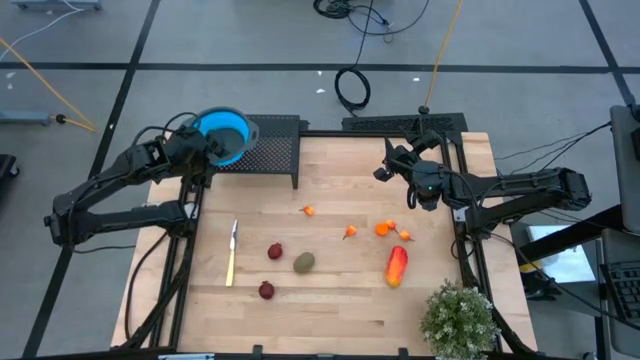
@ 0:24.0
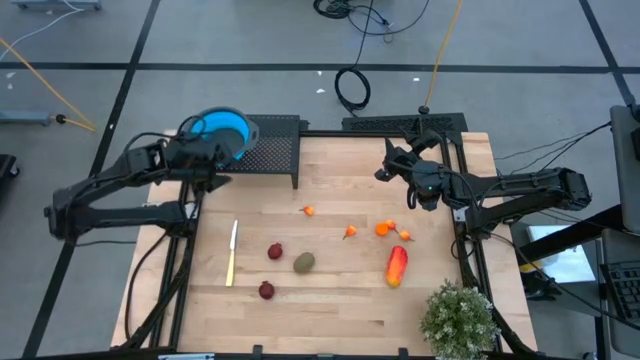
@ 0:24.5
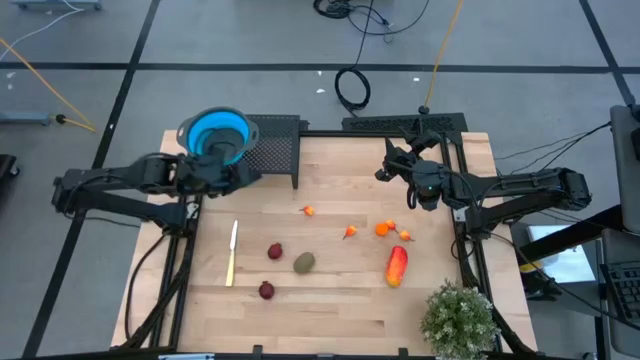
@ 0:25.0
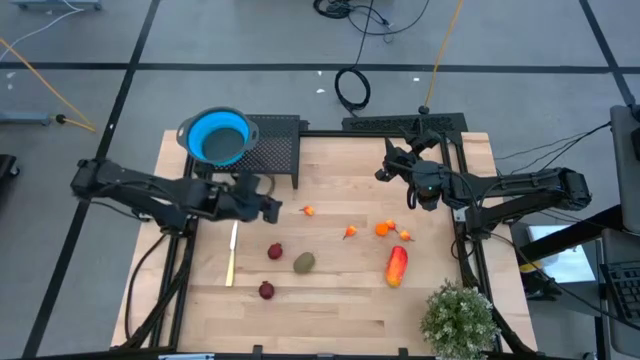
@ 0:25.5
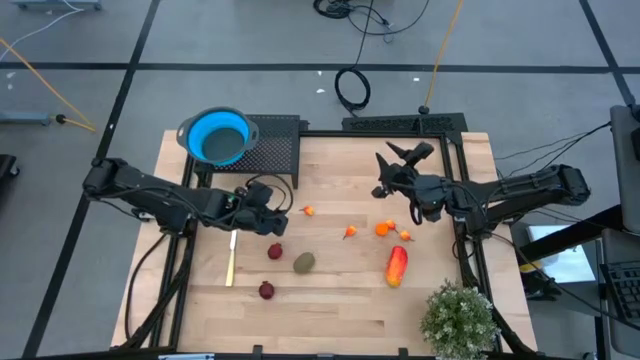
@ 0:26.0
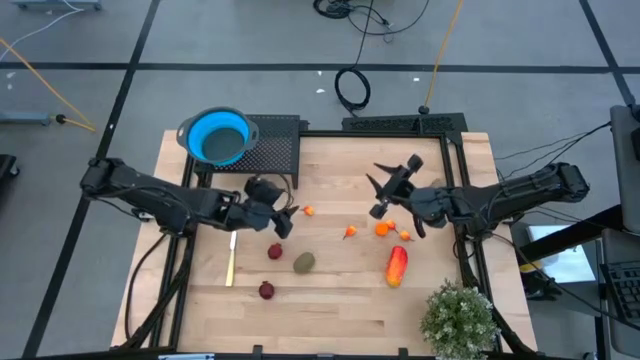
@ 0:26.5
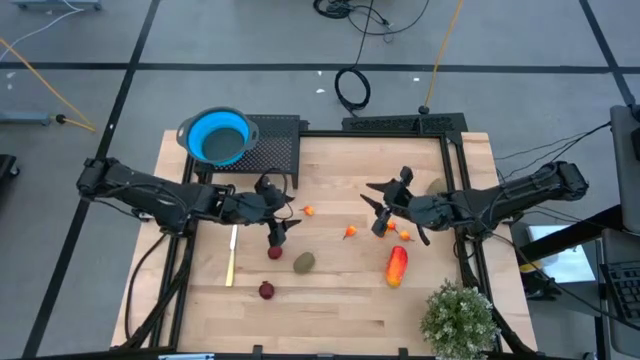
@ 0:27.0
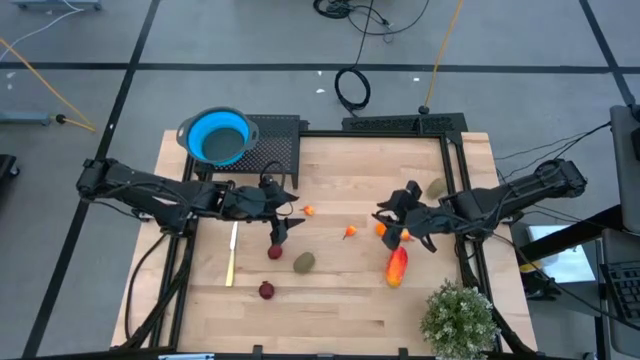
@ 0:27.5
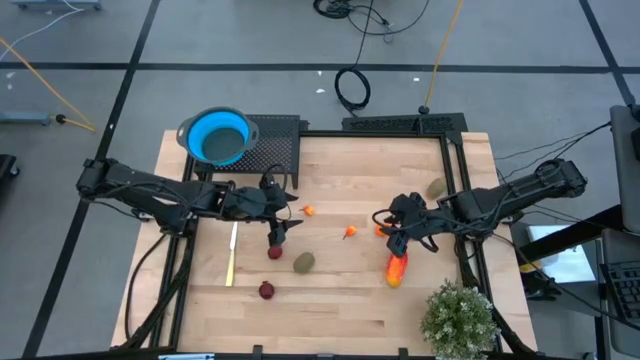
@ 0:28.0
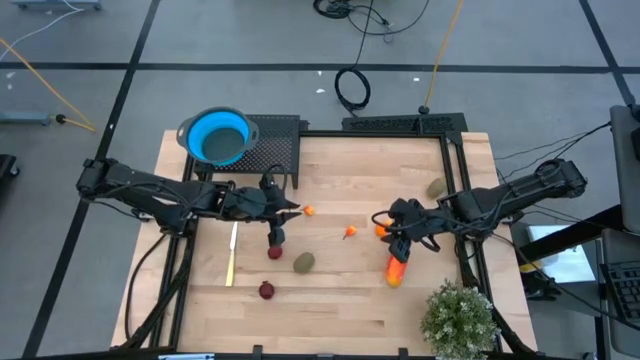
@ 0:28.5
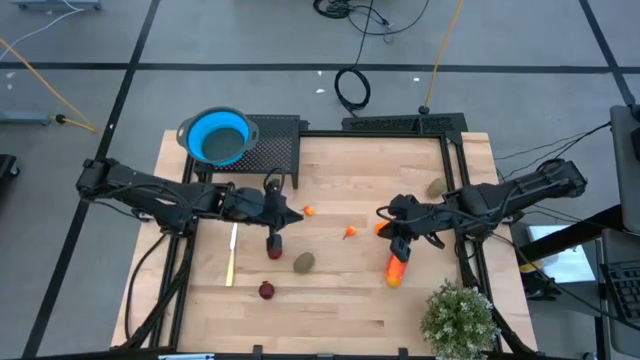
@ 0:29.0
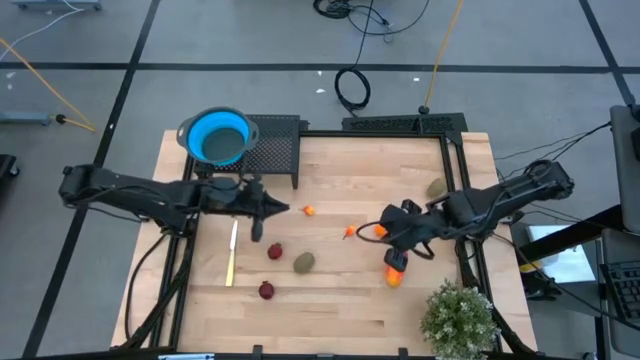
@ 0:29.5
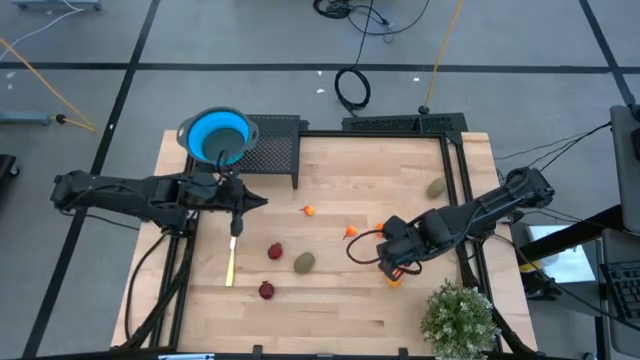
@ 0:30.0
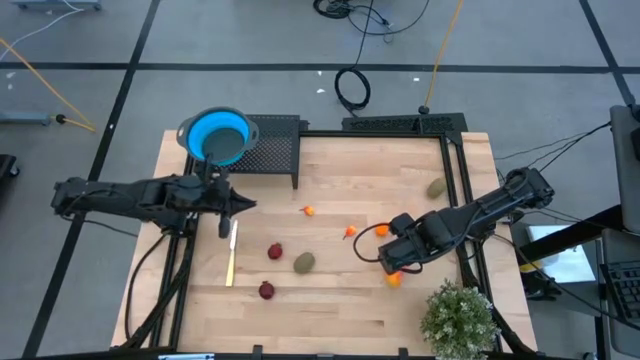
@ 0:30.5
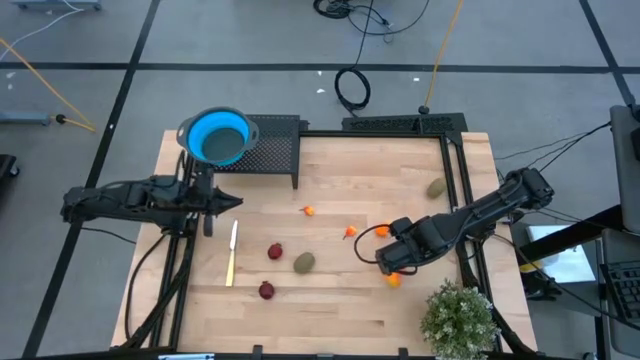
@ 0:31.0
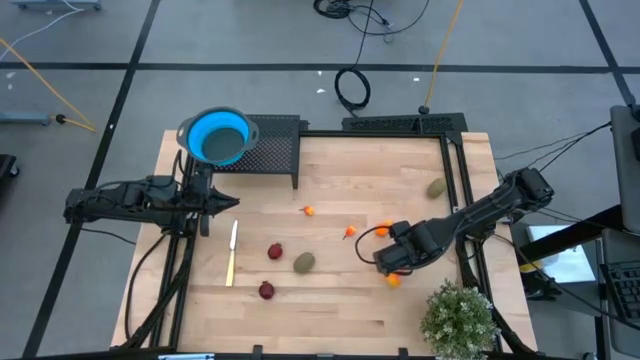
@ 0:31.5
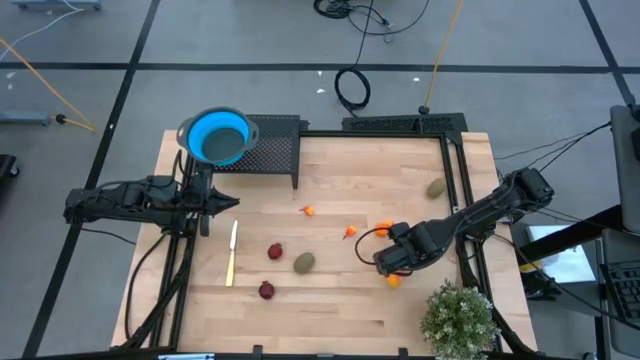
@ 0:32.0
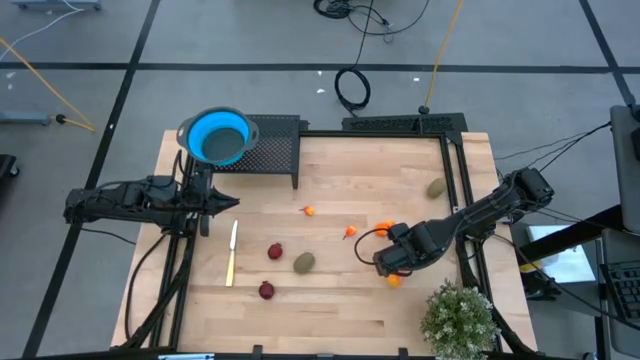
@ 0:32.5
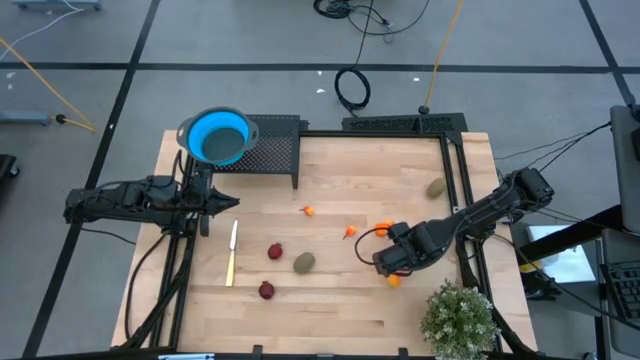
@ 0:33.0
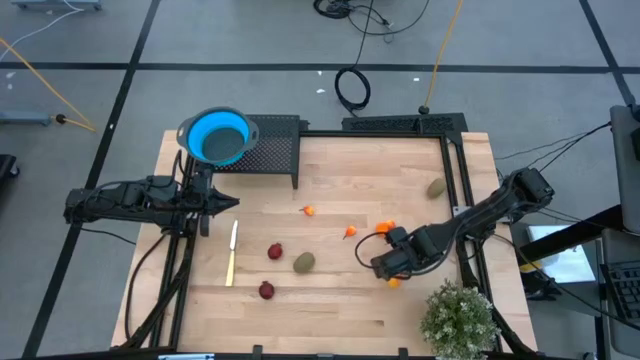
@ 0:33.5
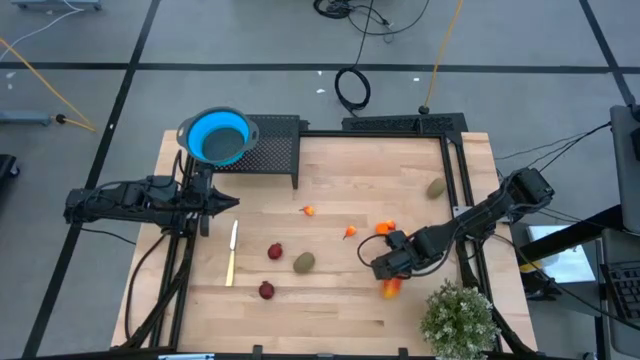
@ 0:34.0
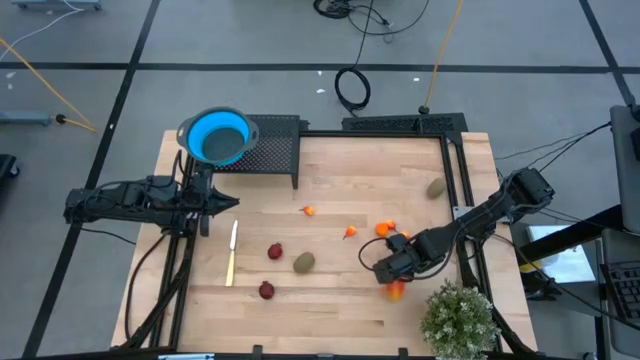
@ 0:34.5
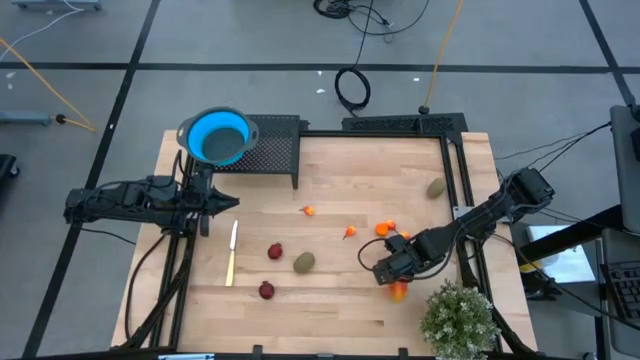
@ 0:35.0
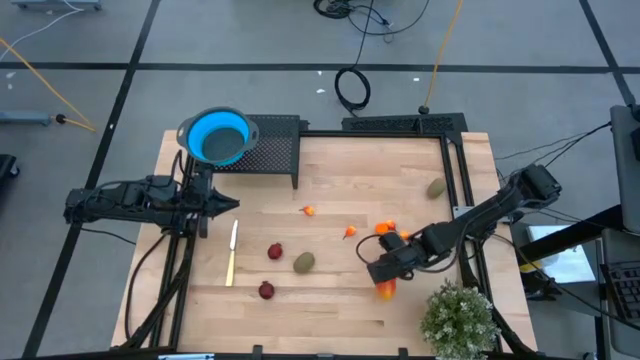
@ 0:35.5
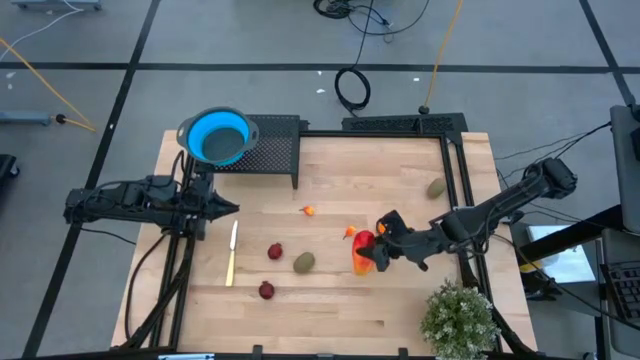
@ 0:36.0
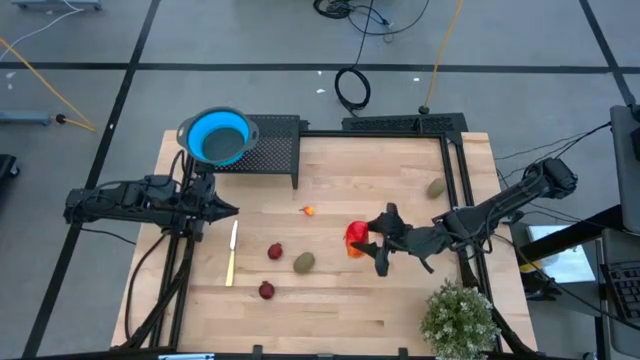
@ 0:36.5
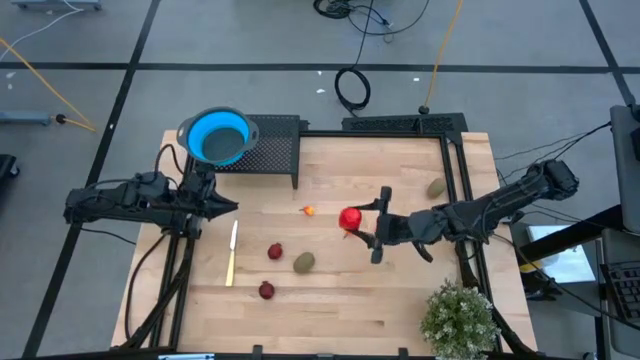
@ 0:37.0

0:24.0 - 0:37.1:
Task: Pick & Place Fruit
Put the mango into the blue strainer bowl on the shelf
